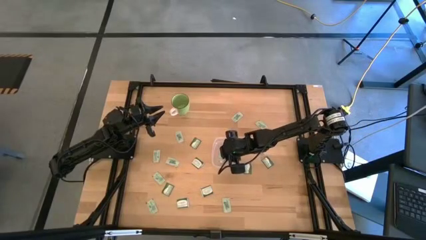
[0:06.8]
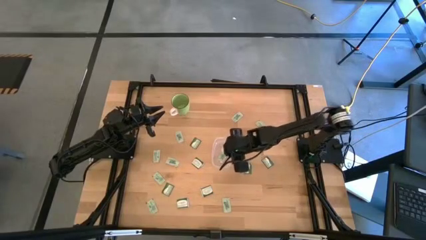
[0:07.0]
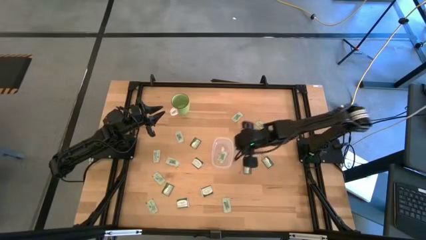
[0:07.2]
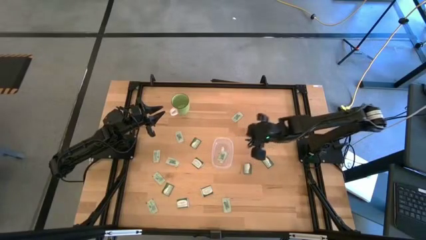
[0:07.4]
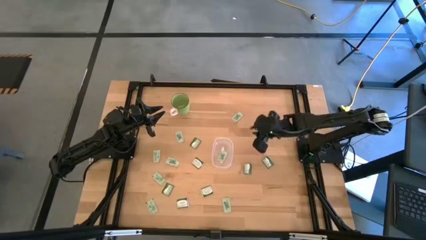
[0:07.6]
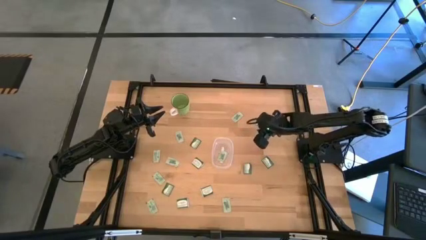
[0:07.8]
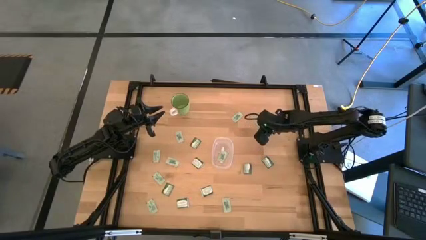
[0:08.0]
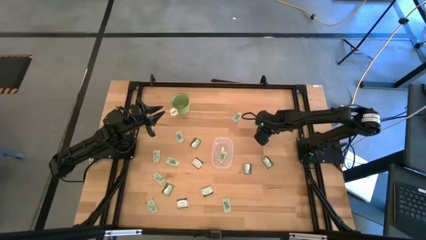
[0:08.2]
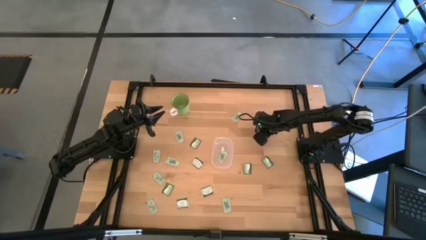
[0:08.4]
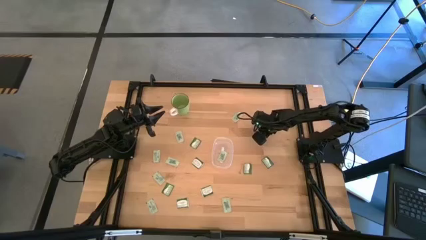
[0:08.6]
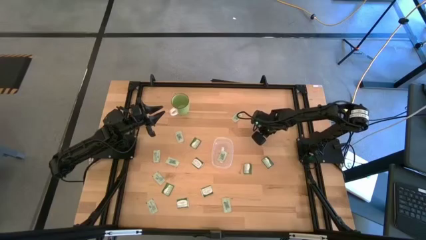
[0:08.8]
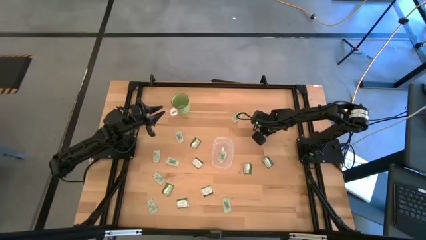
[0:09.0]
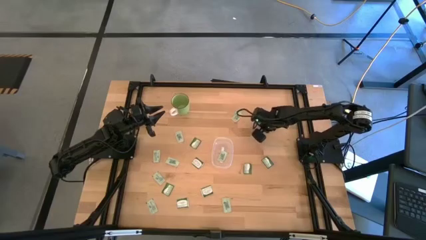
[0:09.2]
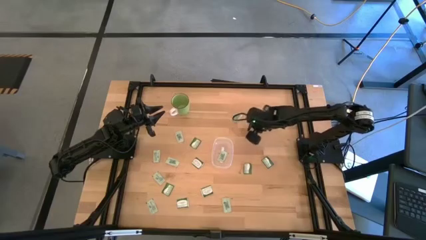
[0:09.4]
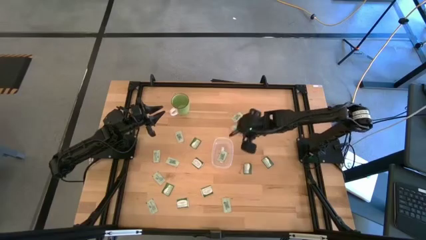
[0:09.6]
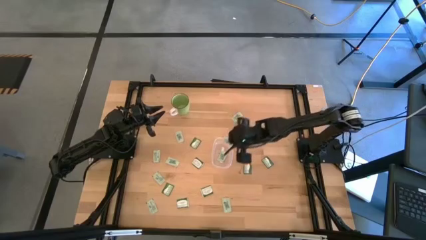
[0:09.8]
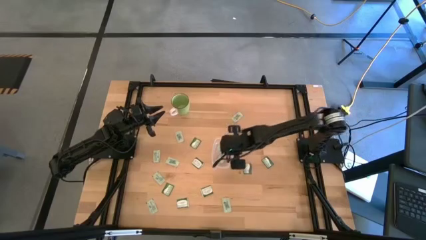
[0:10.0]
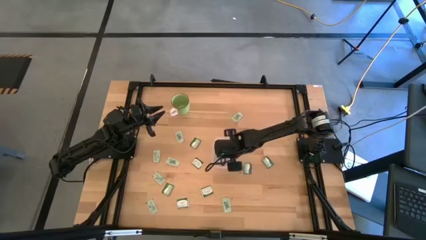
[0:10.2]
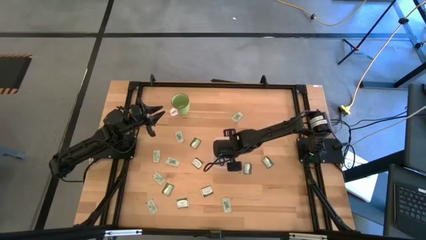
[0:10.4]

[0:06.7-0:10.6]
Task: Pick and place items into bin
Put the stevia packet into the transparent bin

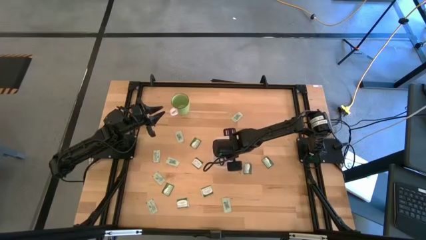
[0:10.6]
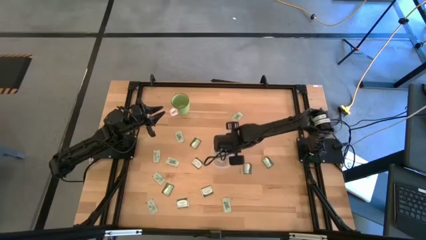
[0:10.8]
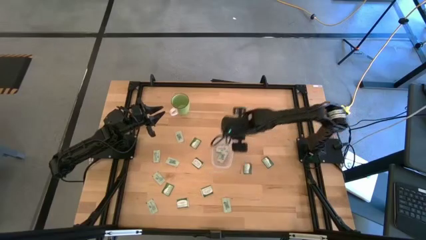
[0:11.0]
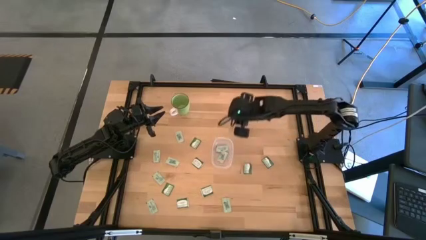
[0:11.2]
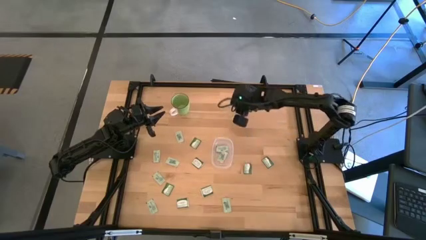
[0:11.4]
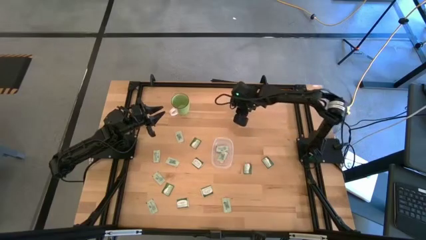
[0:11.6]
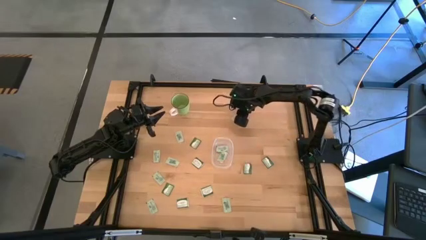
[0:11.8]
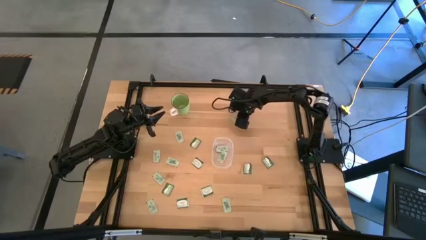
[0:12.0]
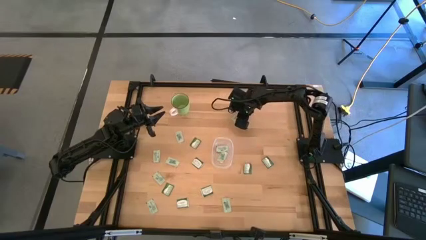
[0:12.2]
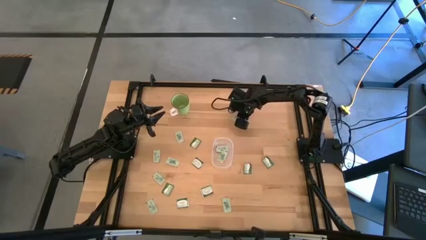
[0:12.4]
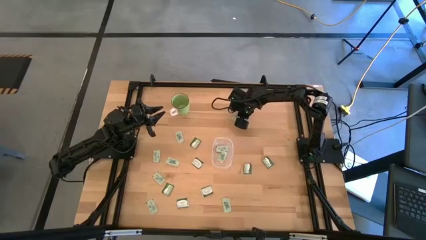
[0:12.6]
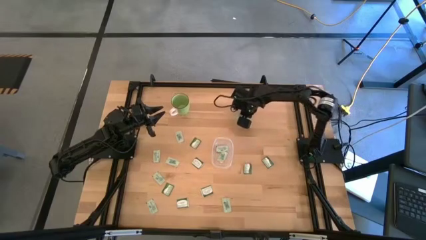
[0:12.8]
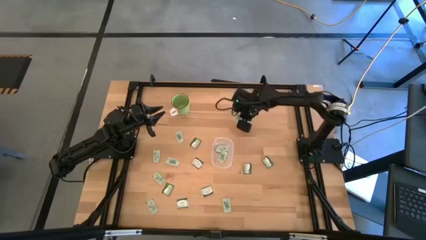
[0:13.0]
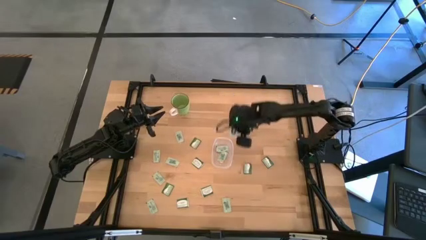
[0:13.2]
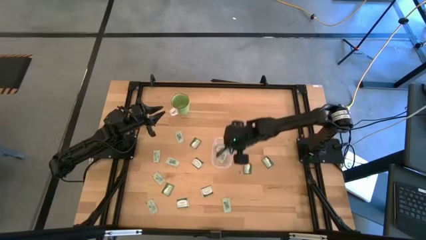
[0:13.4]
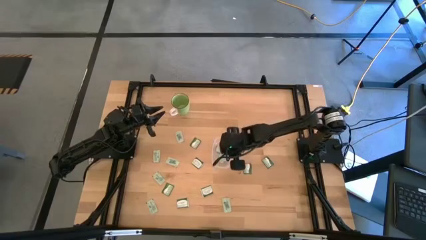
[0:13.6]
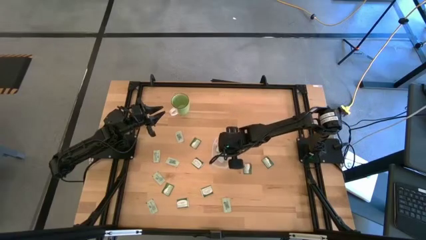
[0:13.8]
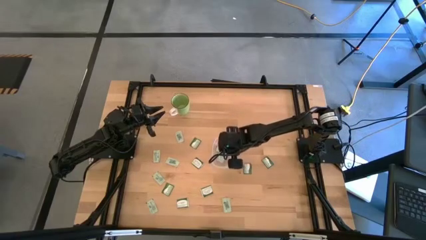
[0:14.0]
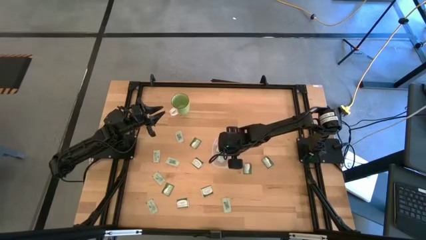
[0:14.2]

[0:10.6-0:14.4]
Put the stevia packet into the transparent bin

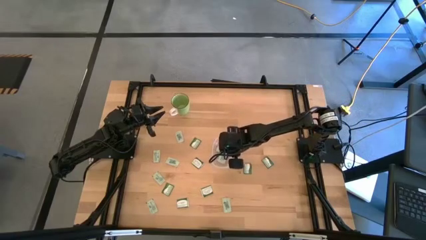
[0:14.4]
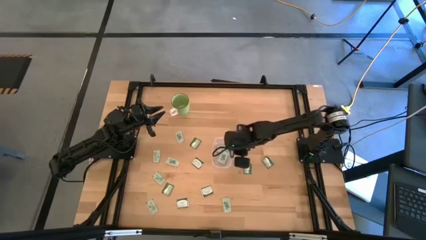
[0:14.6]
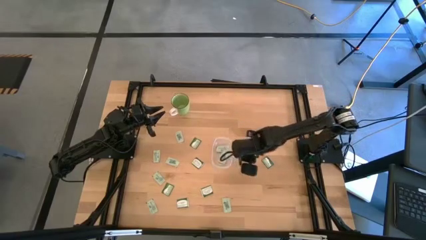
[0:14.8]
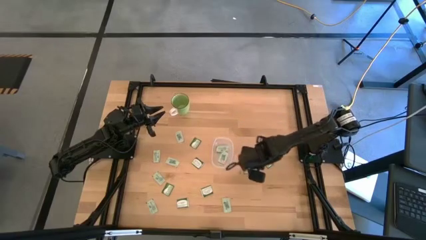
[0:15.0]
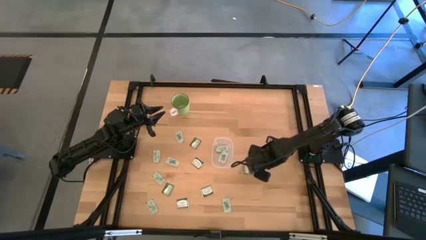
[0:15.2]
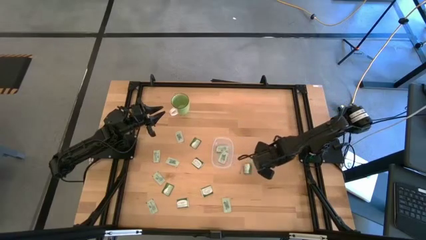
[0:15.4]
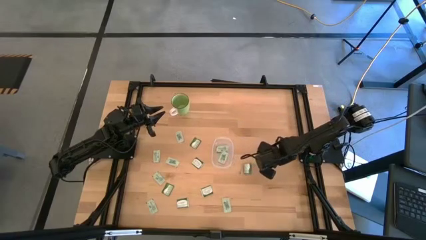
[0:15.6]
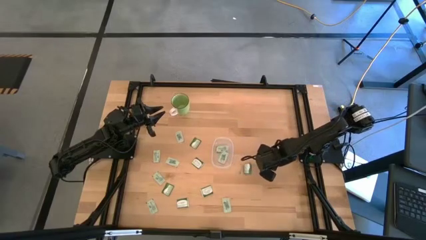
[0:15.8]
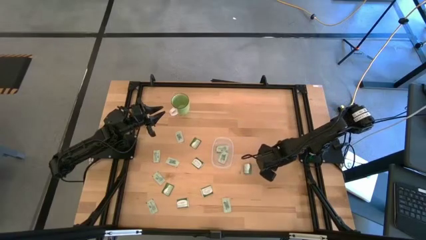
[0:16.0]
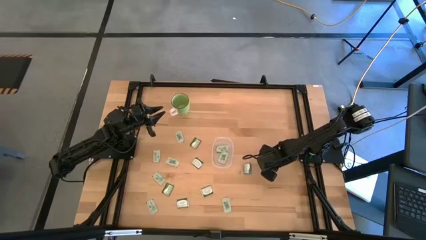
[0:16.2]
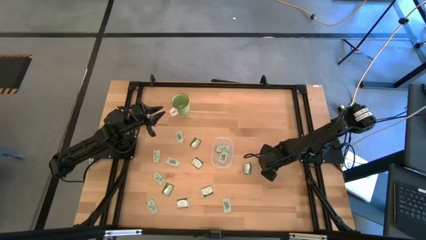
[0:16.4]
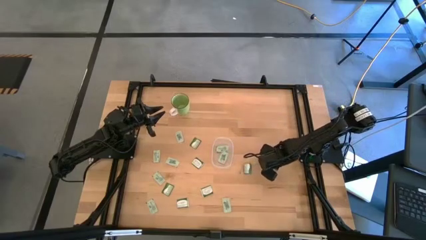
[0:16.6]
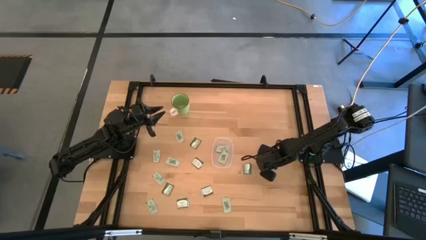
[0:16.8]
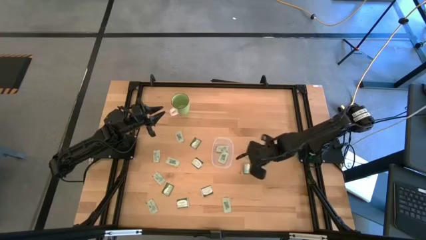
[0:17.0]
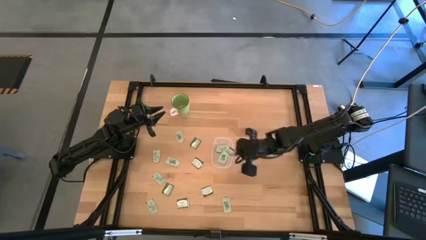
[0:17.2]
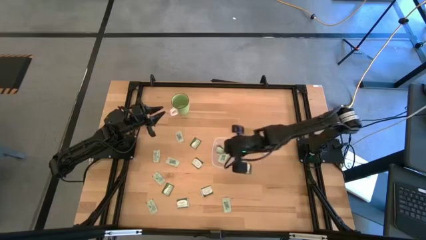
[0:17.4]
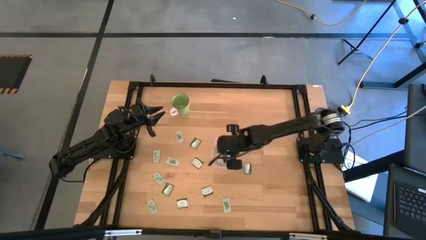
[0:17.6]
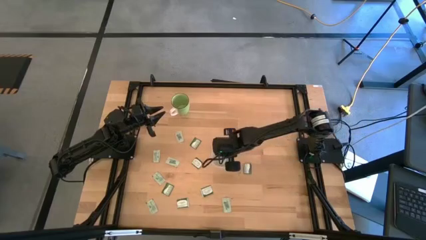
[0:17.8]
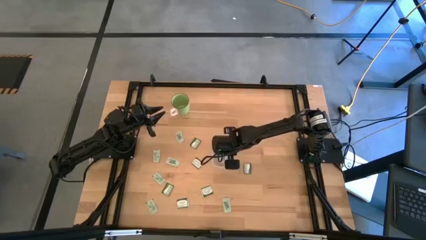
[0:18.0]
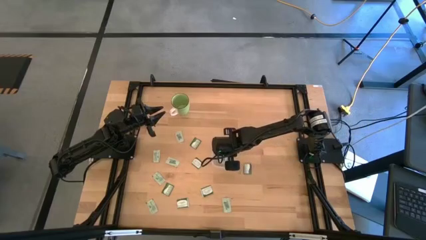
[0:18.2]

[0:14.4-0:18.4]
Put the stevia packet into the transparent bin

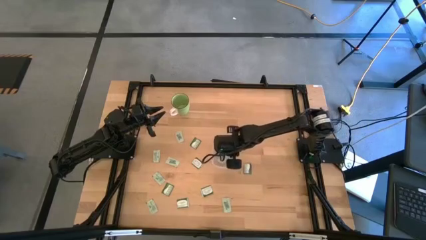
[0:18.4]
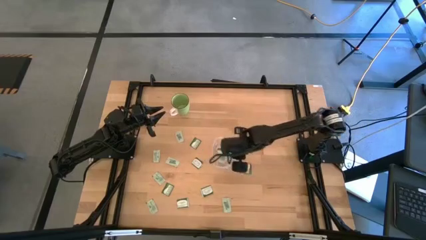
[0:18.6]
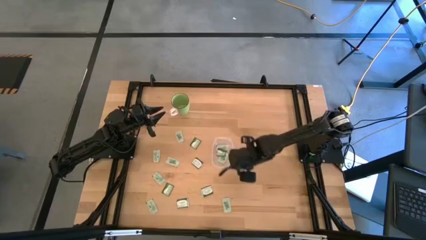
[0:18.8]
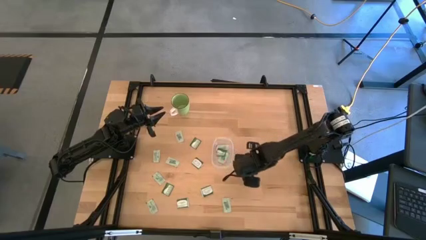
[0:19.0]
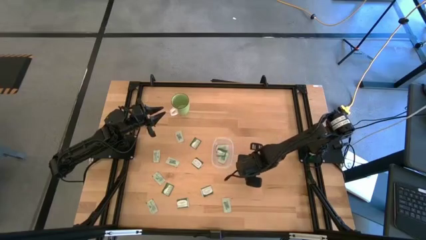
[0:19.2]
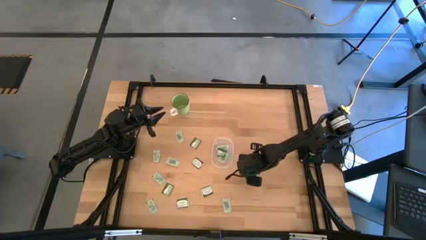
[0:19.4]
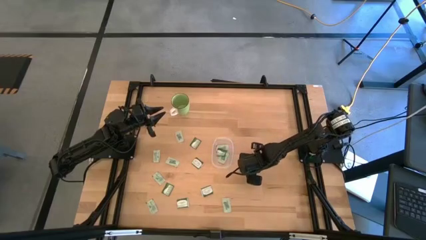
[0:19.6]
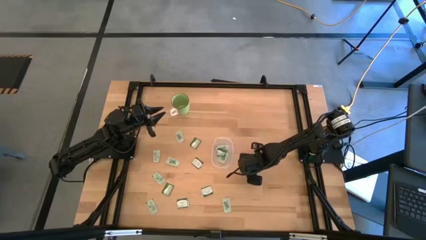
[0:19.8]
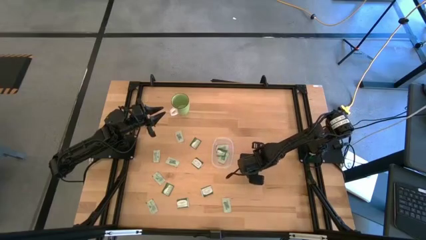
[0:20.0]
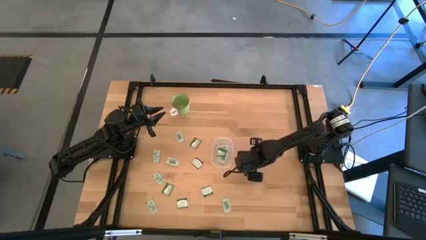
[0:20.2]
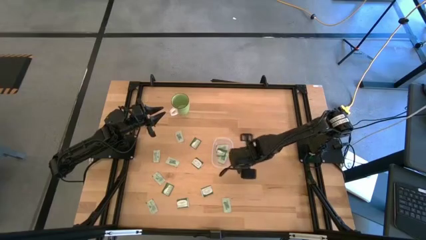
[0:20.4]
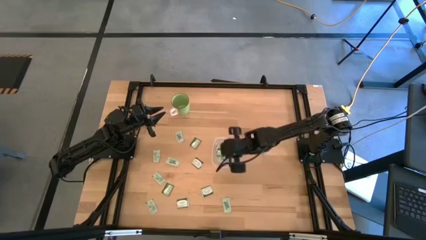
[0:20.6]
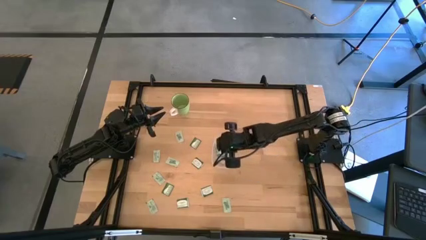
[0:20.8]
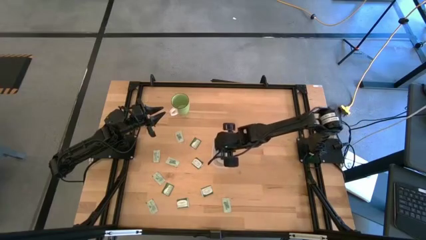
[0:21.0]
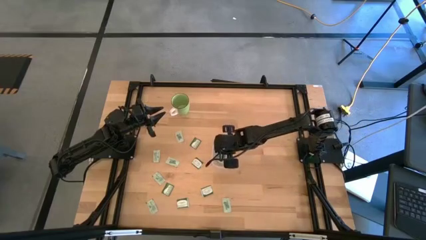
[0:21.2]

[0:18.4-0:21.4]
Put the stevia packet into the transparent bin

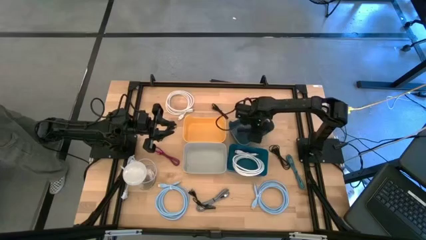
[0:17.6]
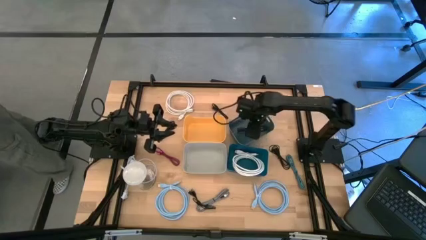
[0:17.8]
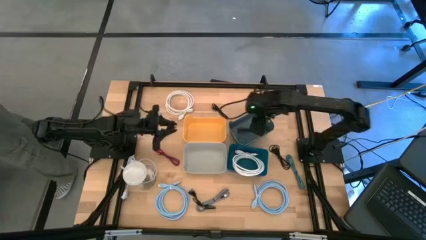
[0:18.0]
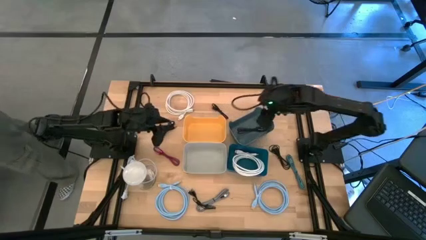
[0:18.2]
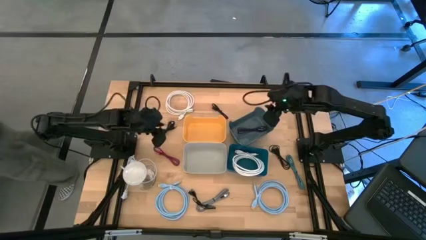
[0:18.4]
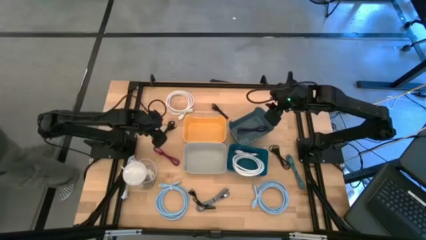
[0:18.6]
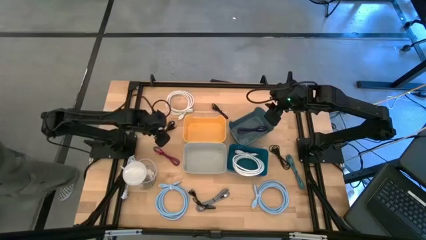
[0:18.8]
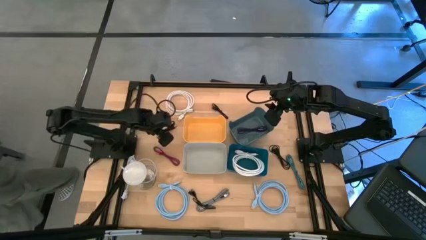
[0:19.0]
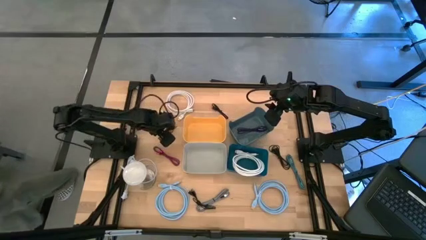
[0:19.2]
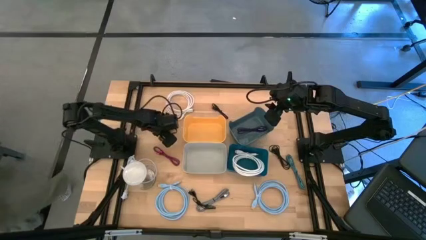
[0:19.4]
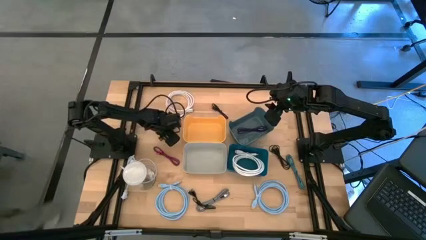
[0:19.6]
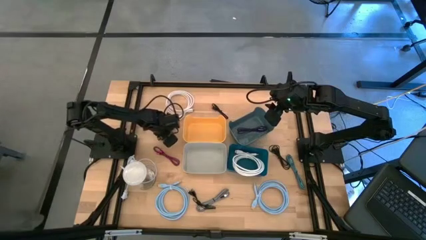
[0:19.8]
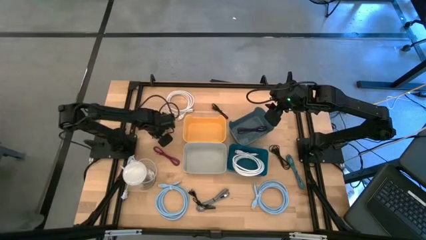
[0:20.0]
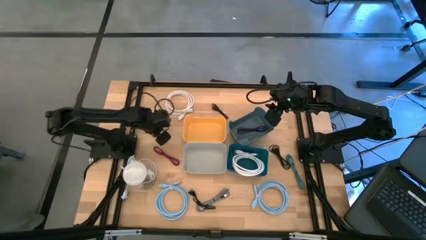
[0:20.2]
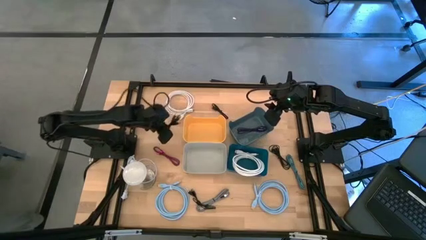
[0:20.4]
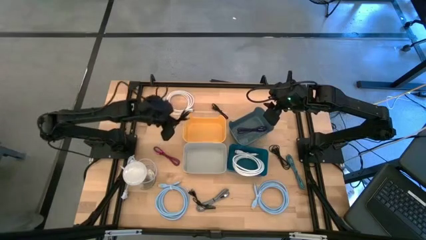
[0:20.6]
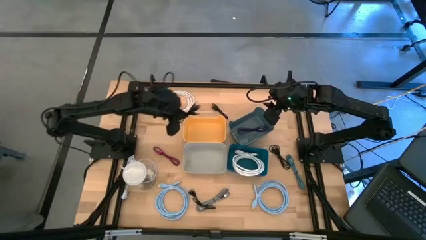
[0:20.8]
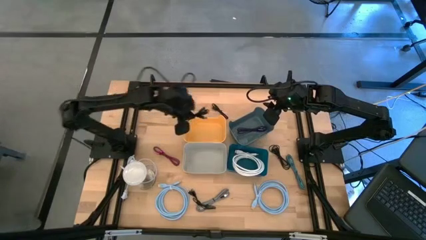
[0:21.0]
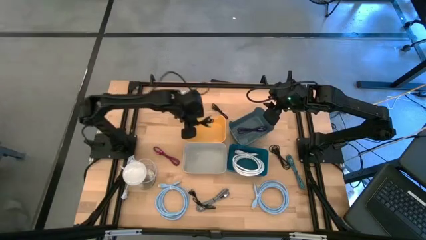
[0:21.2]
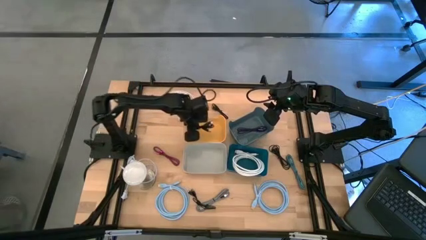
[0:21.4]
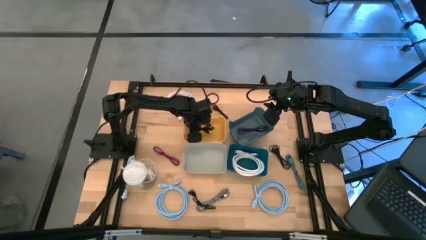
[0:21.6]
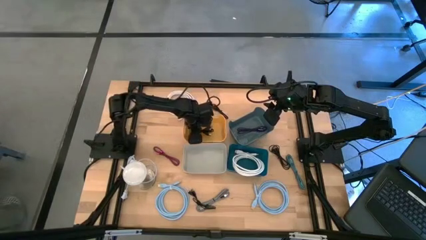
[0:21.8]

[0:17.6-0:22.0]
Task: Pick & Place USB Port
Put the black USB cable into the yellow bin
